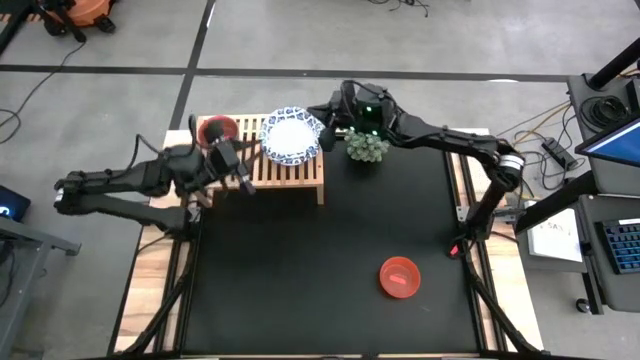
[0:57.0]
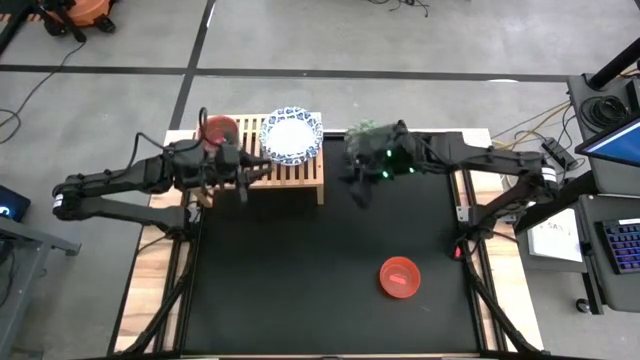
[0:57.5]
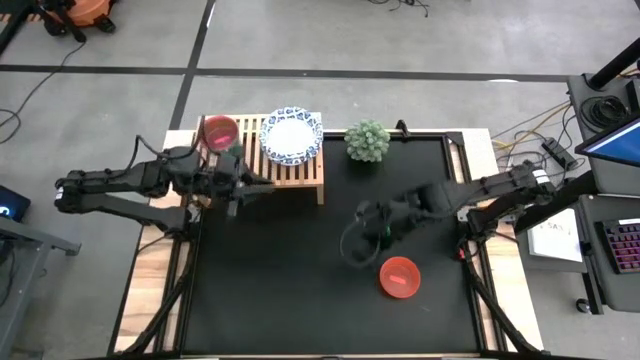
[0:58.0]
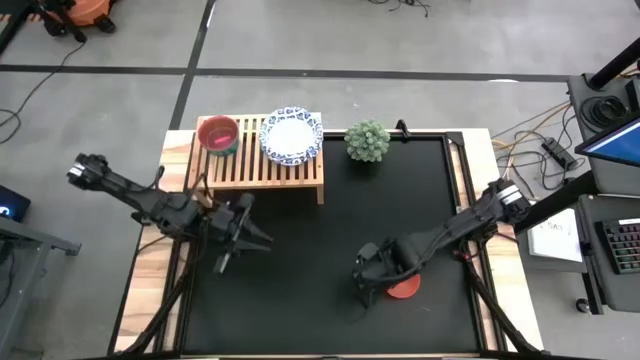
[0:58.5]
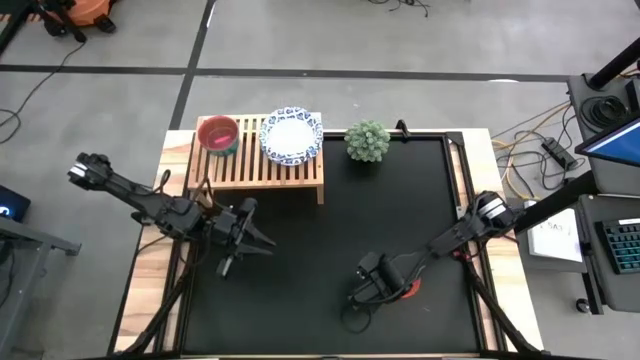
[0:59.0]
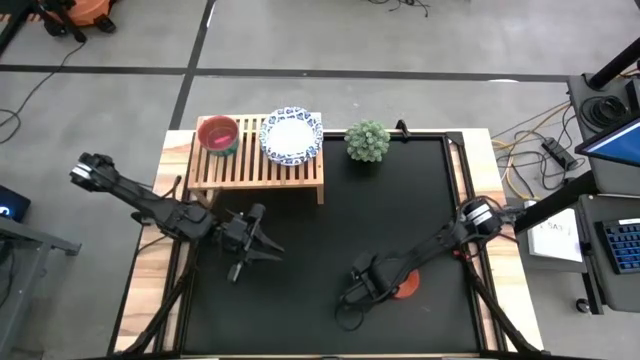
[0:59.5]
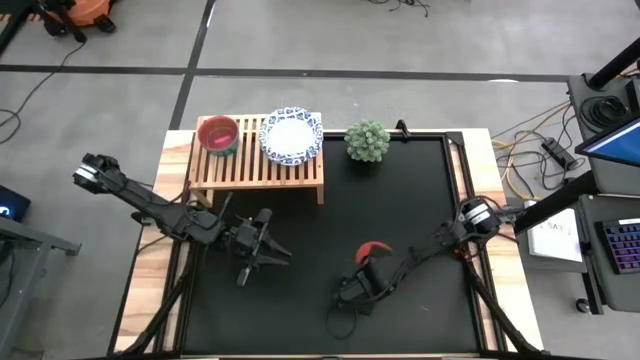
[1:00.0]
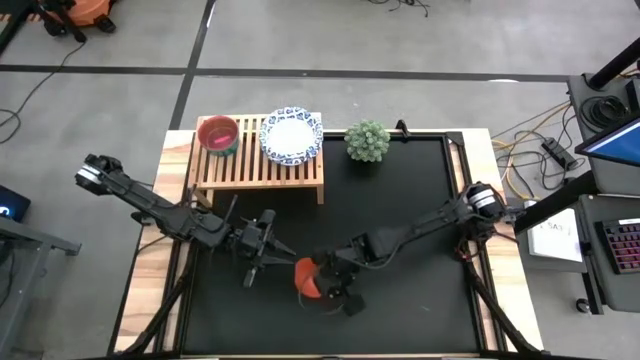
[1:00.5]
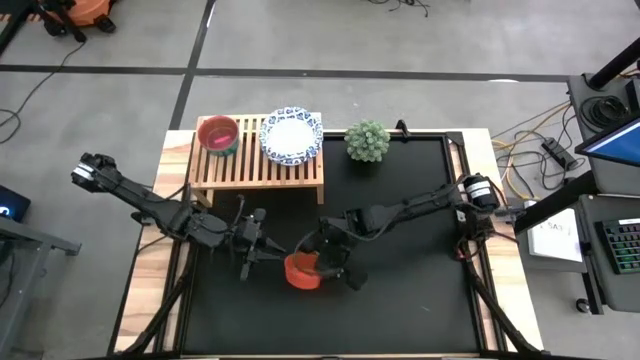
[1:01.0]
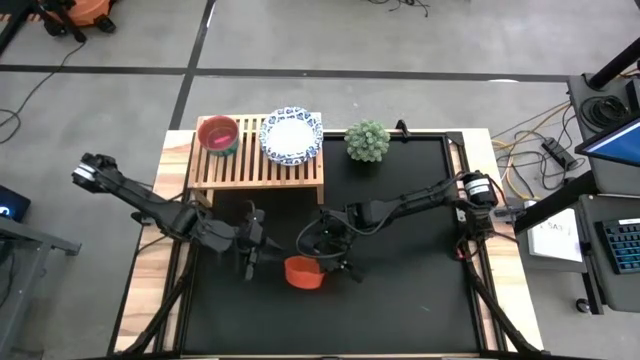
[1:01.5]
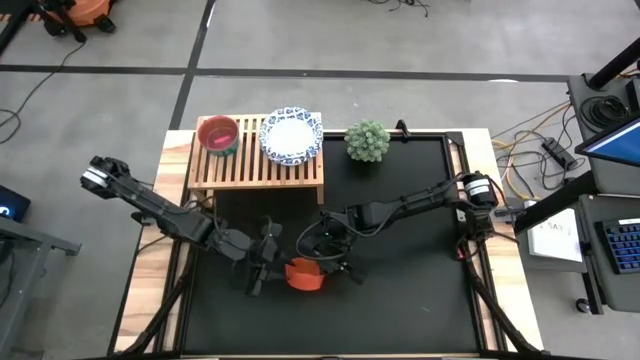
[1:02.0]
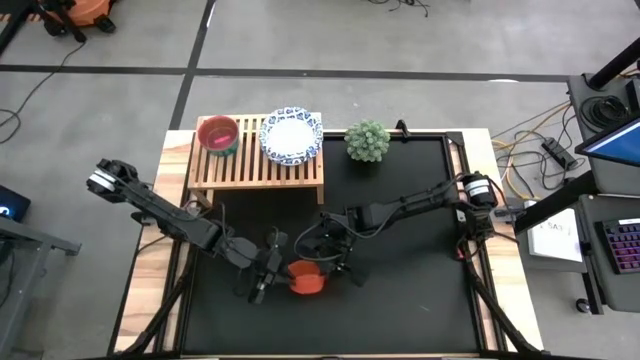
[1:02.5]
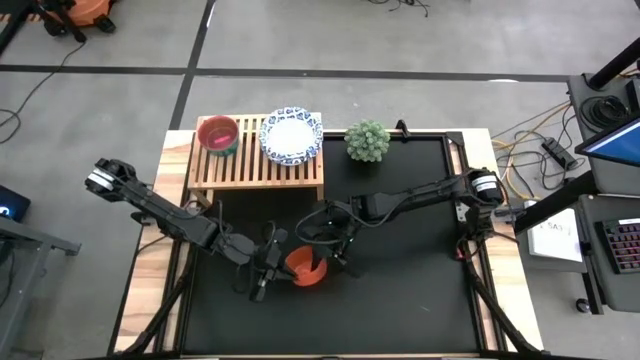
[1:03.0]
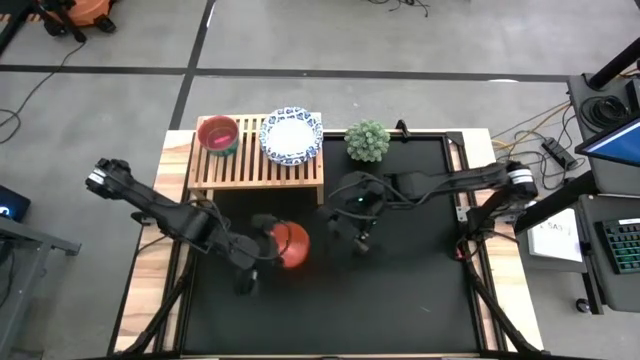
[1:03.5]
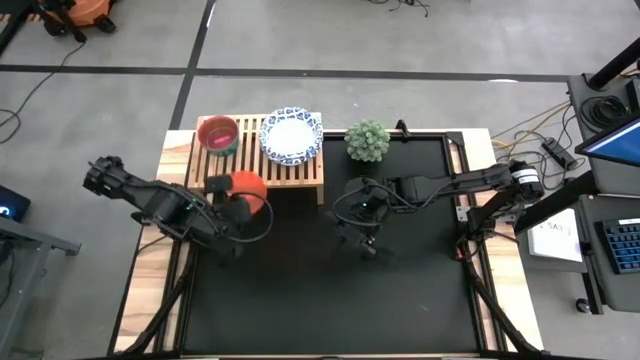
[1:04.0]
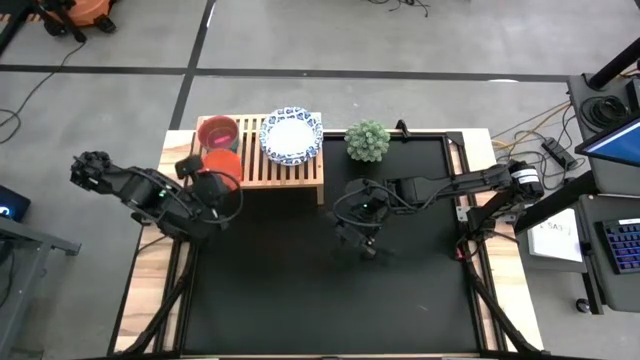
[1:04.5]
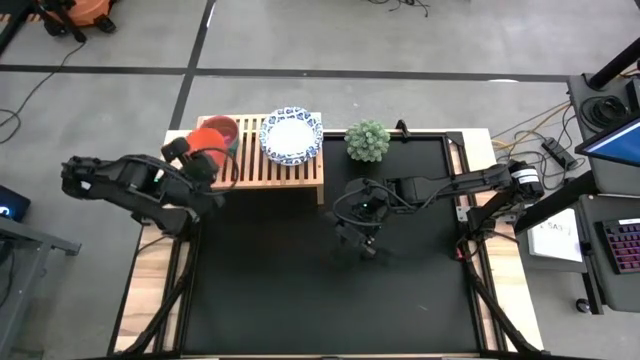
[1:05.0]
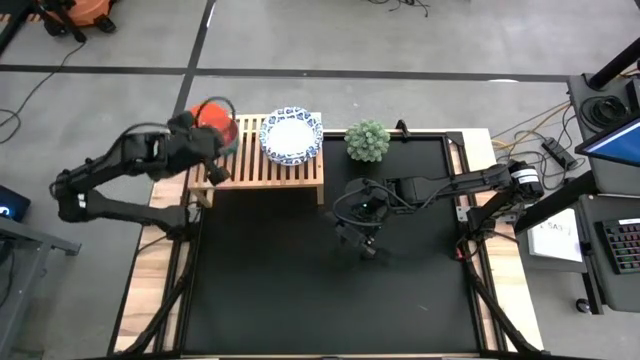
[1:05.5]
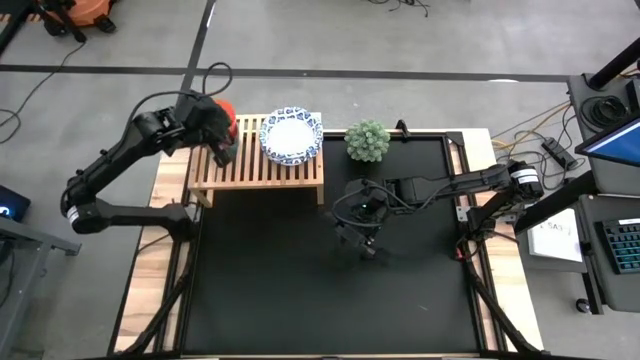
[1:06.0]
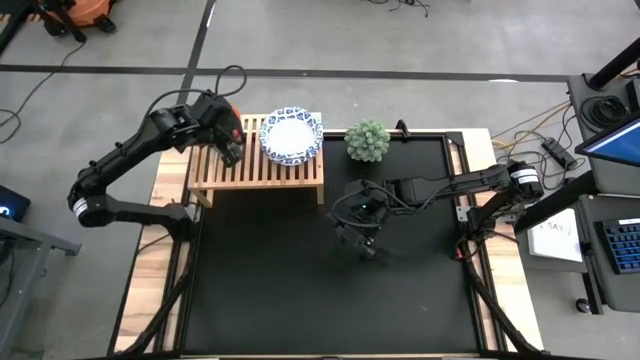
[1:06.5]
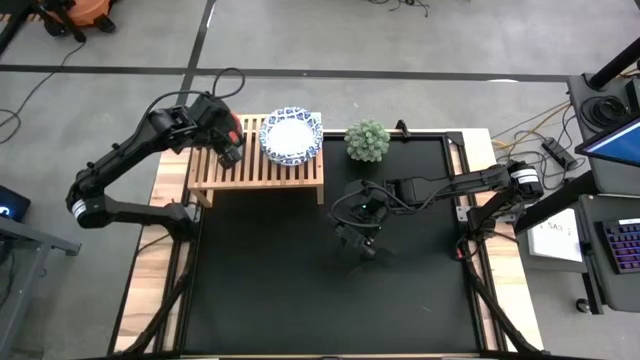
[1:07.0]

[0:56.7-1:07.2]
Task: Place and stack bowls onto a shelf
Stack the orange bowl on top of the pink bowl on the shelf

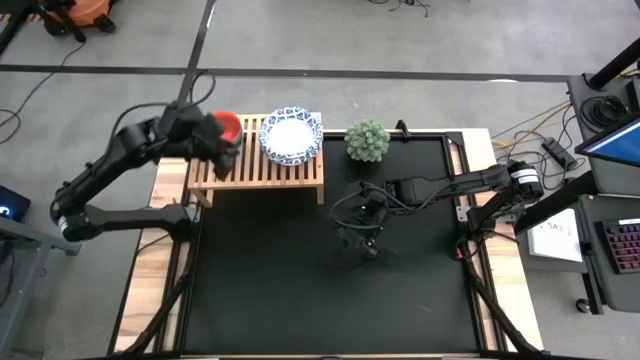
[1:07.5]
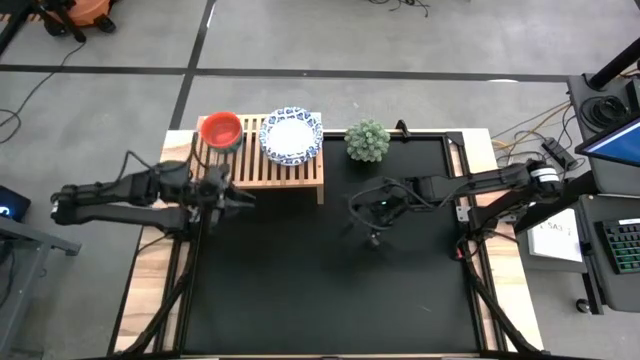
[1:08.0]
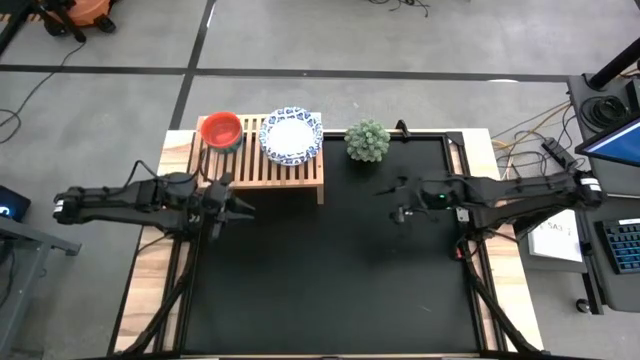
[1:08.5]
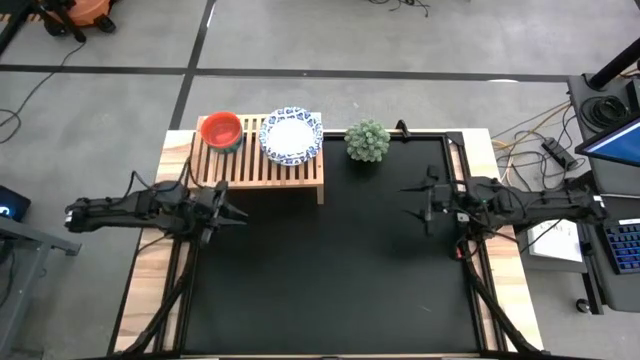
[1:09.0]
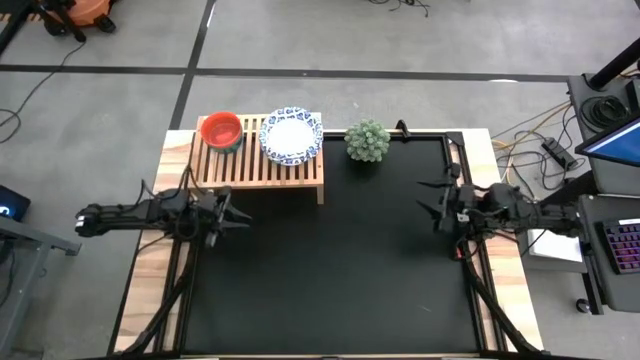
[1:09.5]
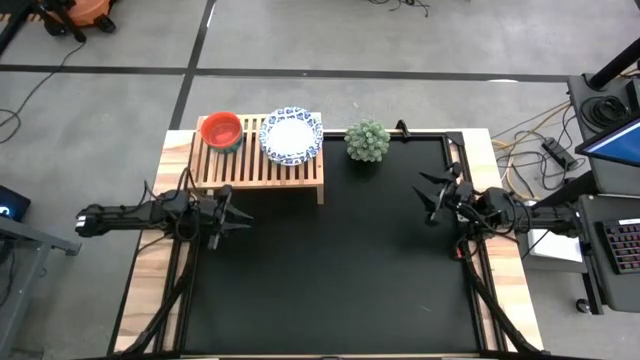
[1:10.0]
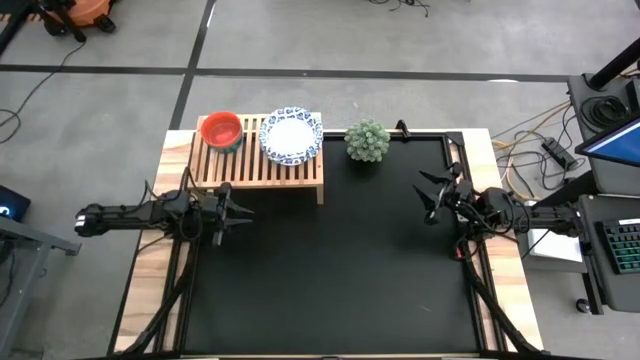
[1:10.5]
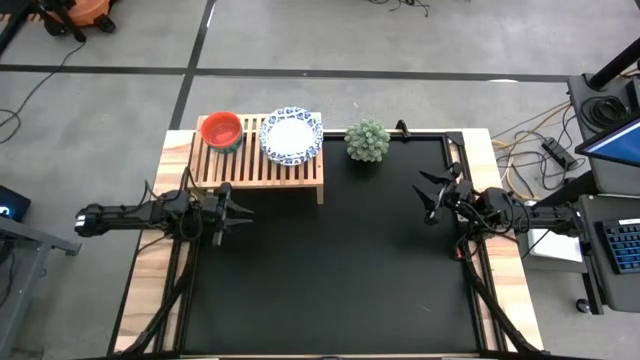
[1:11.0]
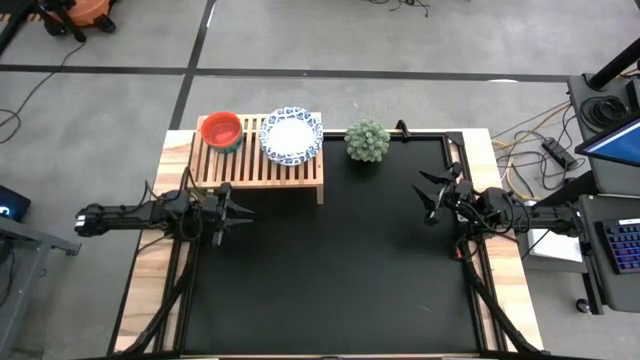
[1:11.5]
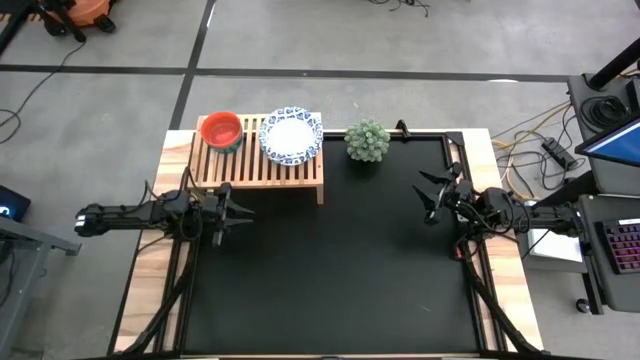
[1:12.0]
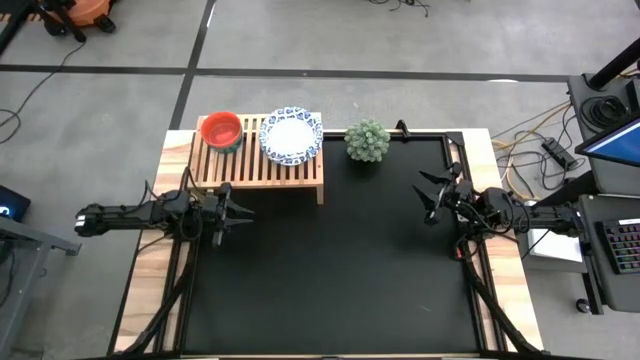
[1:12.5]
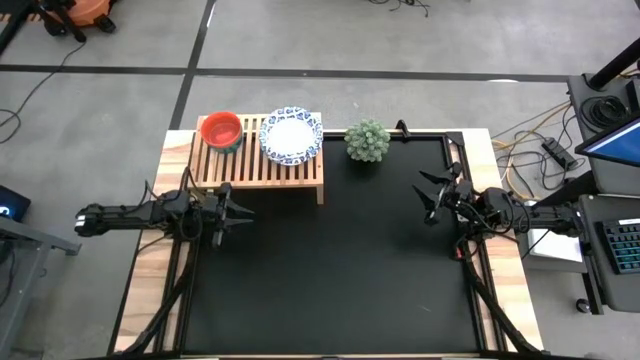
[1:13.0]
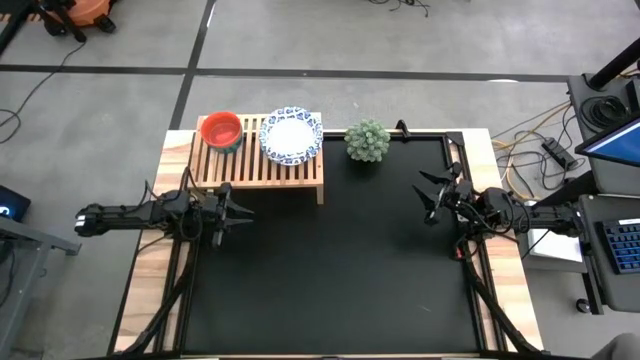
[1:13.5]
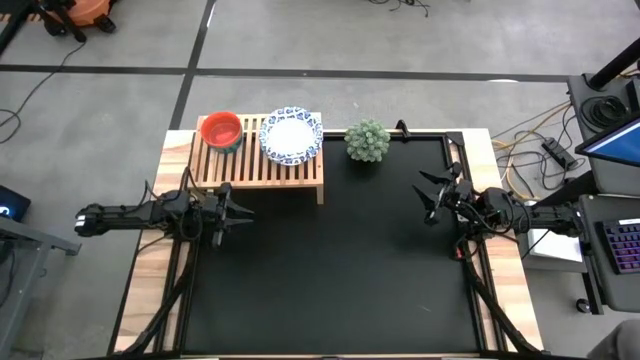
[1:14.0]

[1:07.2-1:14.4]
Return to Home Position

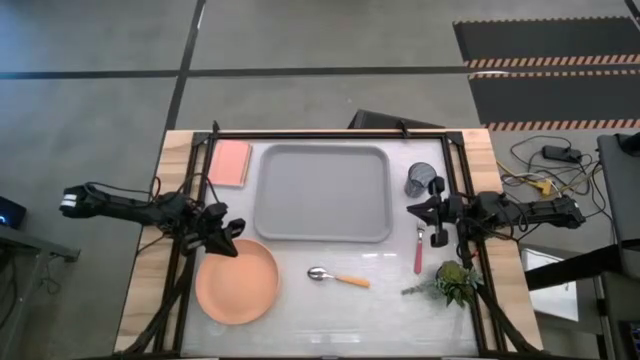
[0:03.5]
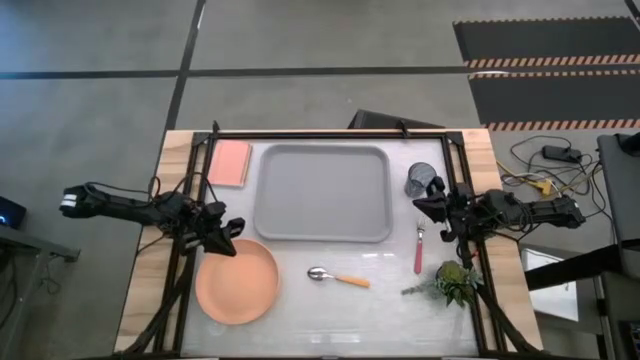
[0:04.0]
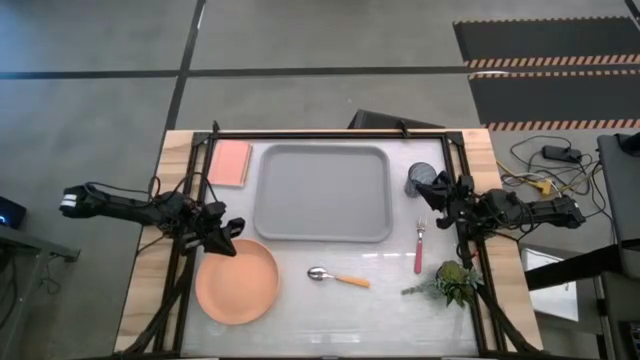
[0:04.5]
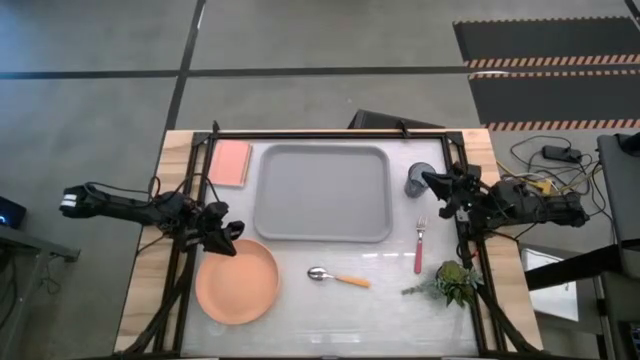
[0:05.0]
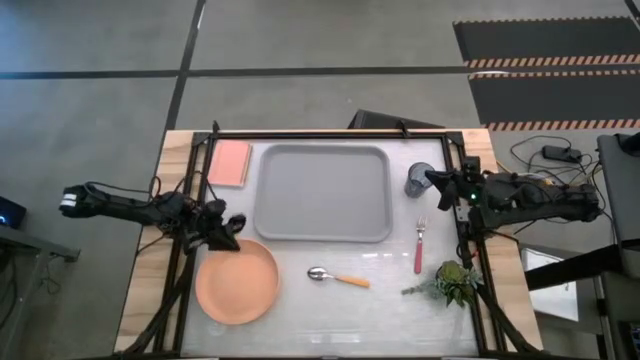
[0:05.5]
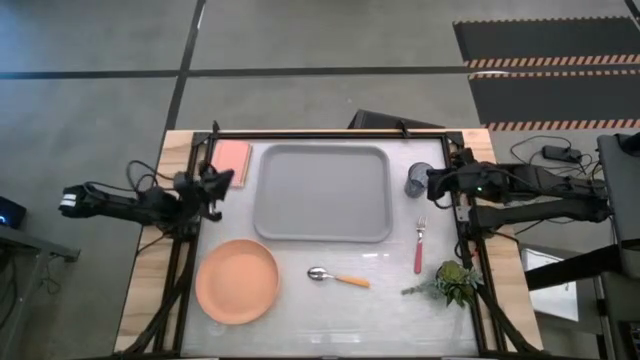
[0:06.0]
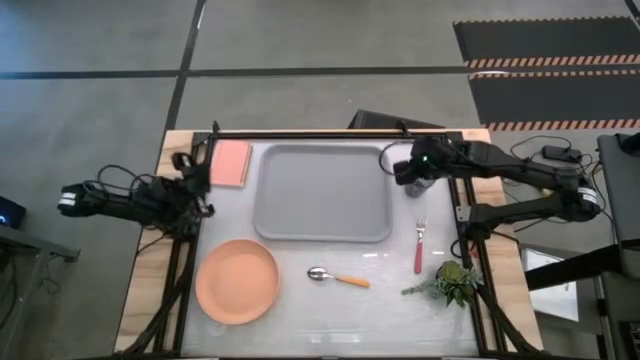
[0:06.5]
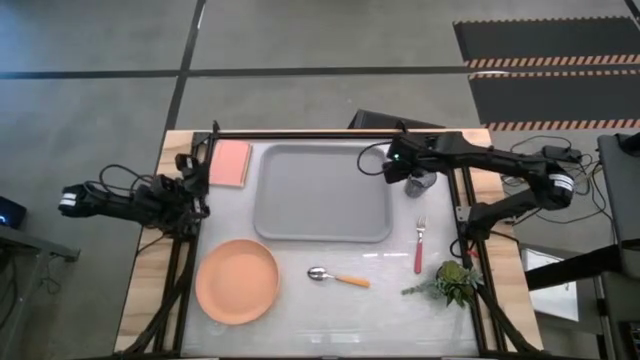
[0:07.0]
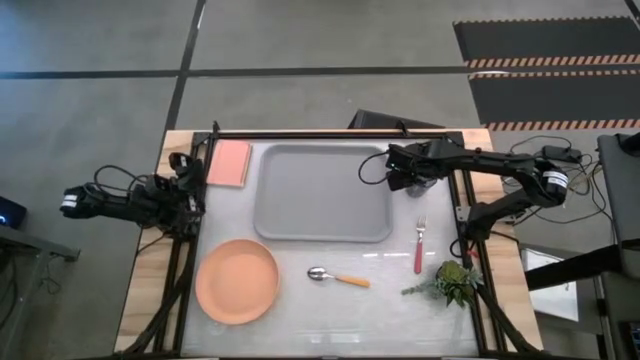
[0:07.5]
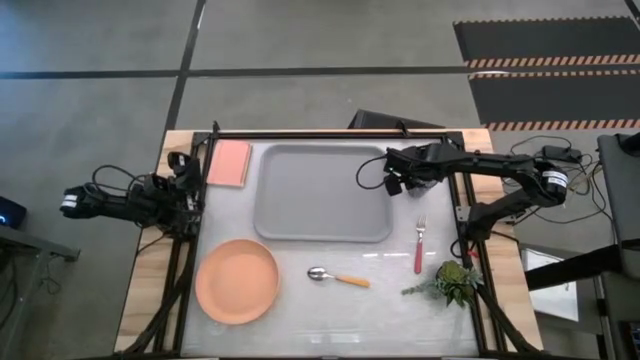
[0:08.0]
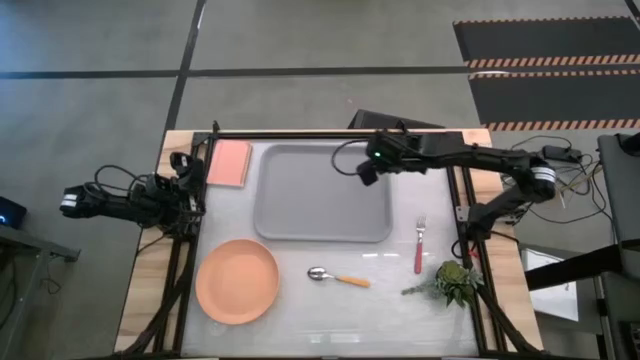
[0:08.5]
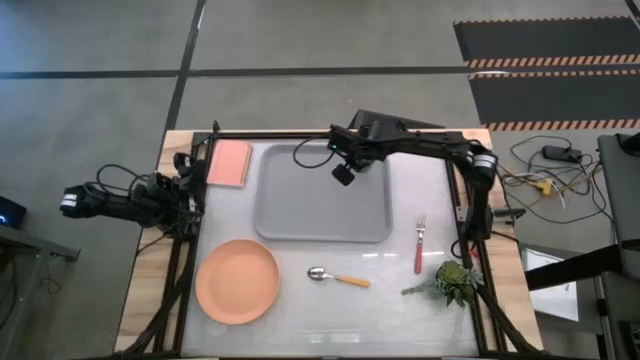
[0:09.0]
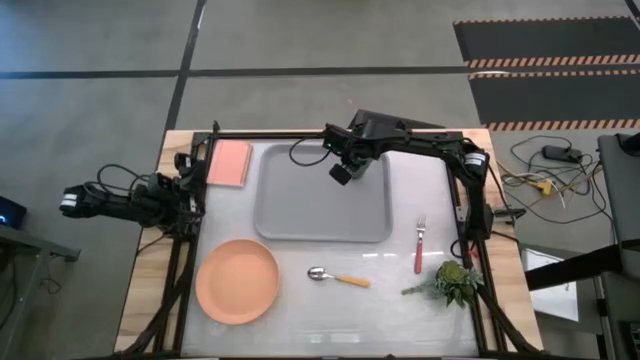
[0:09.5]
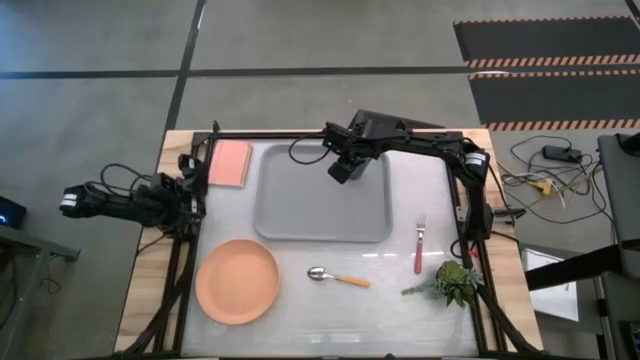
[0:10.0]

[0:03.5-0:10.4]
Task: Pick and place plate/cup/fork/spoon on tray
Put the blue cup on the gray tray
